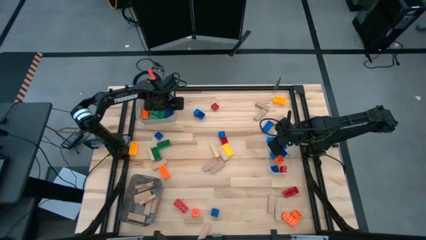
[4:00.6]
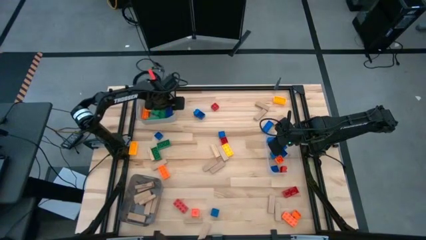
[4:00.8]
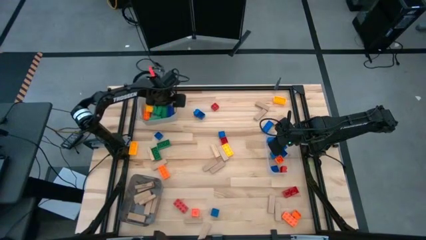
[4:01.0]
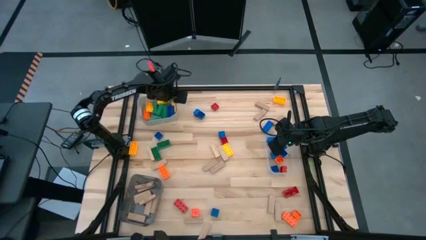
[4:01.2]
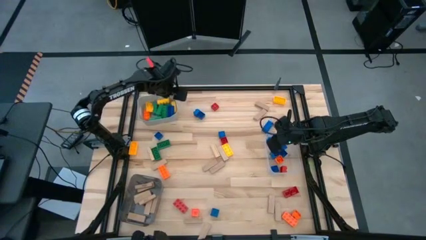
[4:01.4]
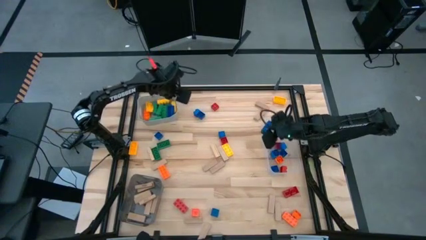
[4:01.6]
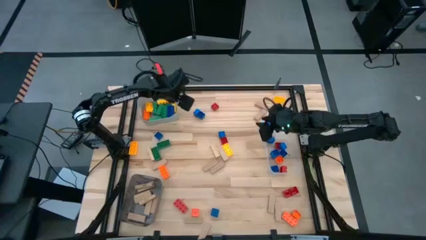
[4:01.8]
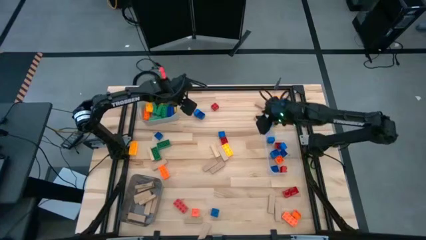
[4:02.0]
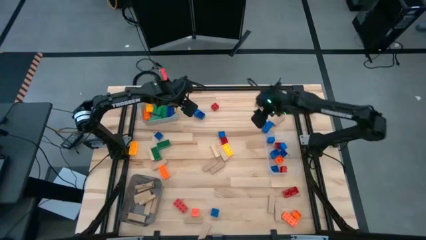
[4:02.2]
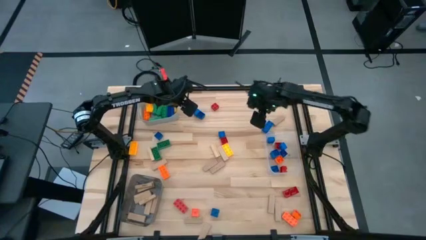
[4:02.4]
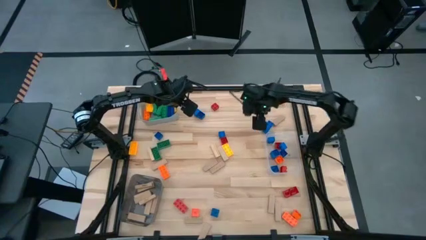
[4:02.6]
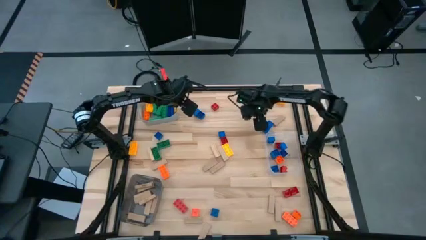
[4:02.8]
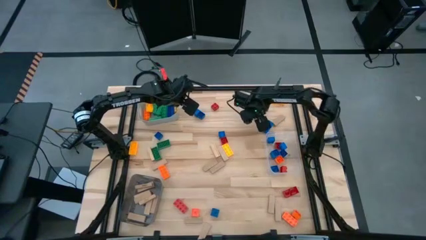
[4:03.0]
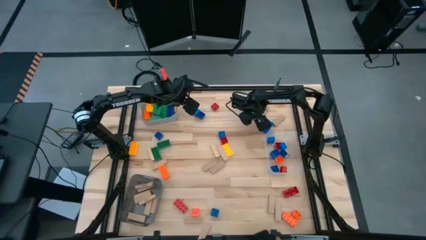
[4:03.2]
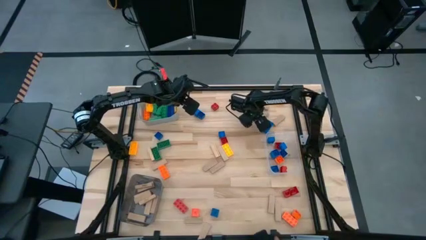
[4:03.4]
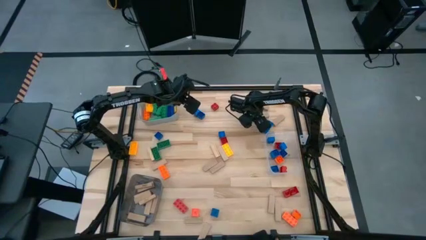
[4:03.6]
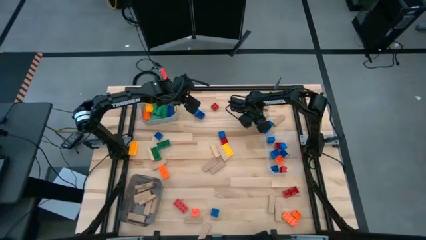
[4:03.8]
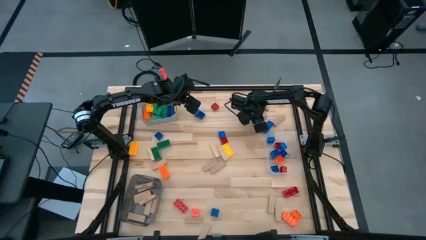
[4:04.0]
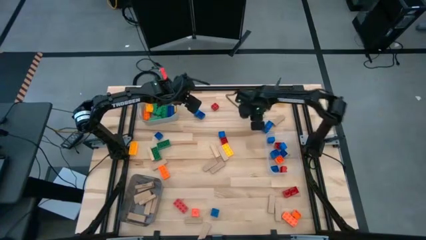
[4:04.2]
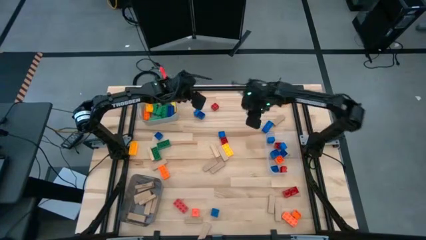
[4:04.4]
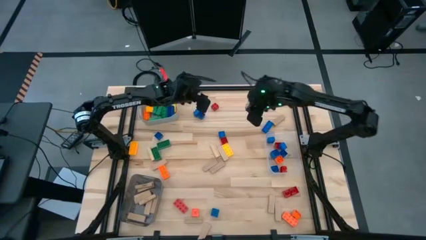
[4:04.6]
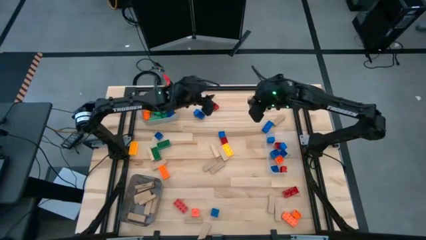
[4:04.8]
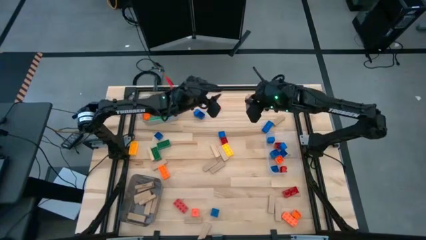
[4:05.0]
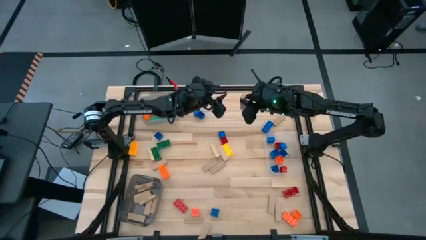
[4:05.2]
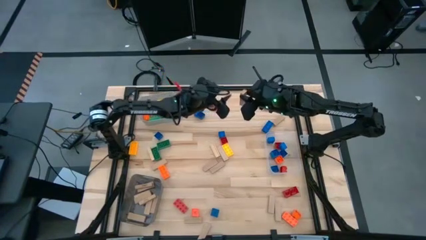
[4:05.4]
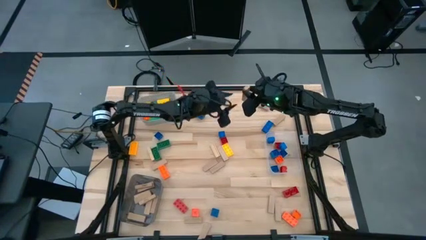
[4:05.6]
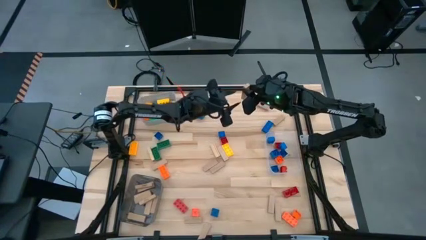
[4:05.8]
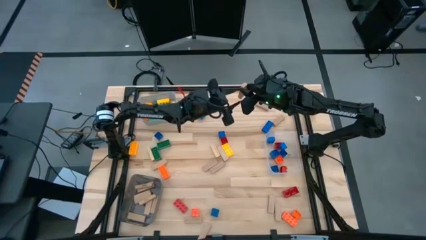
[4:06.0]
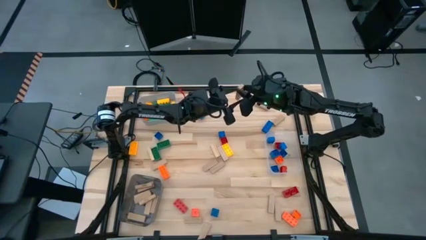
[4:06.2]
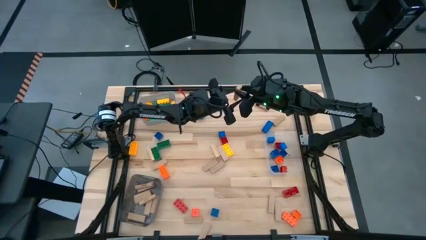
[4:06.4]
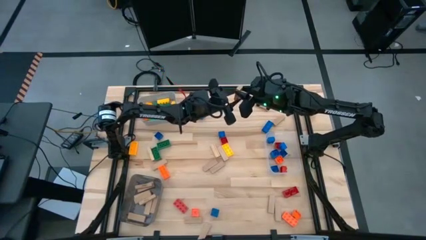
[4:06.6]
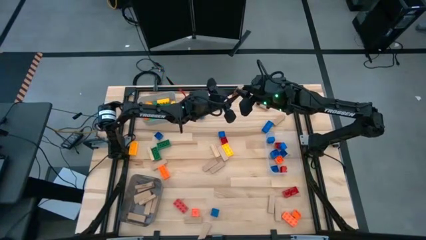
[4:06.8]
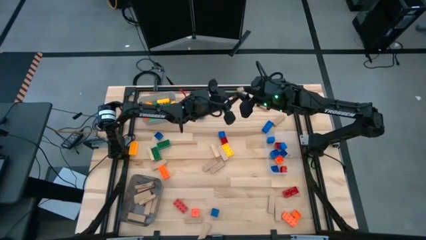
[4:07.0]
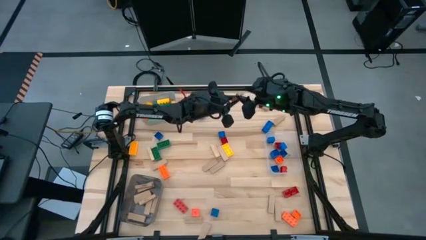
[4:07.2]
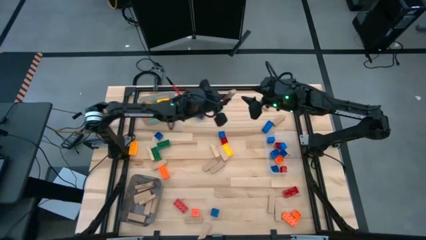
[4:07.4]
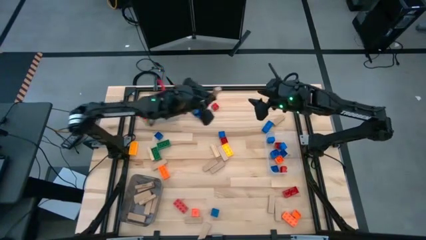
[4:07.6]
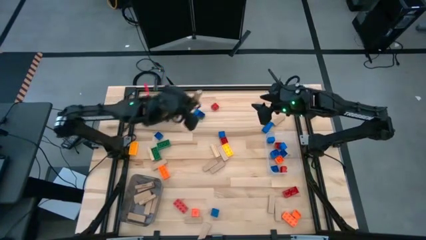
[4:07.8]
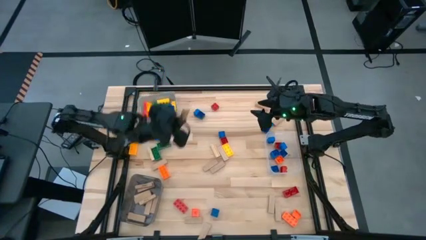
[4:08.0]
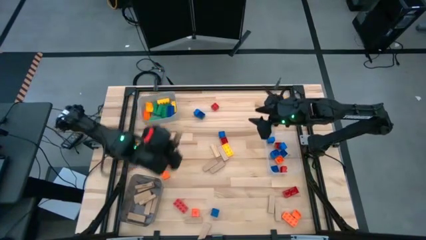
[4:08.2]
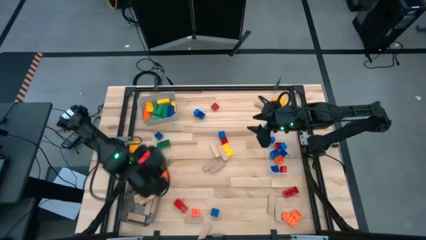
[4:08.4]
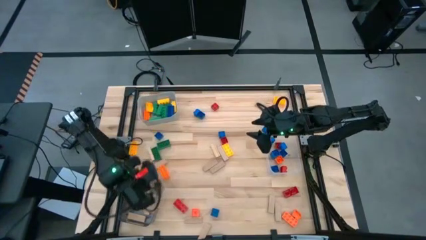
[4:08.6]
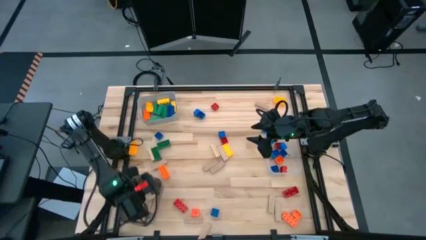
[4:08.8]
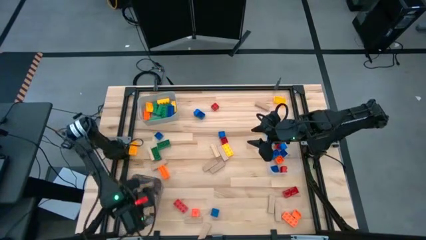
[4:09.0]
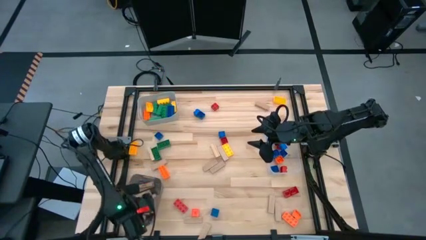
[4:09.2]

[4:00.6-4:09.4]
Task: Sort blocks by size
Put the brown block into the black bin

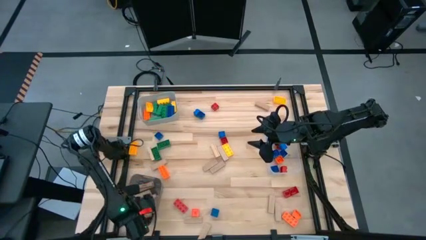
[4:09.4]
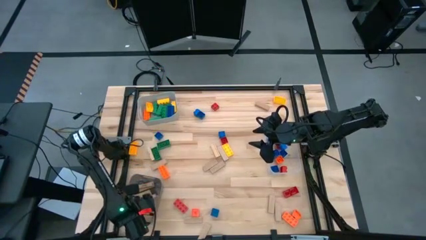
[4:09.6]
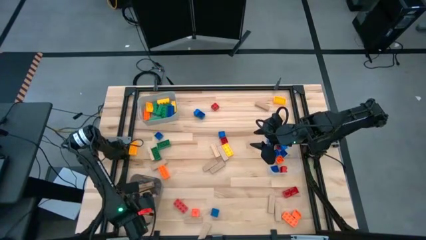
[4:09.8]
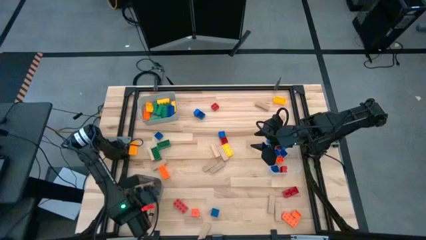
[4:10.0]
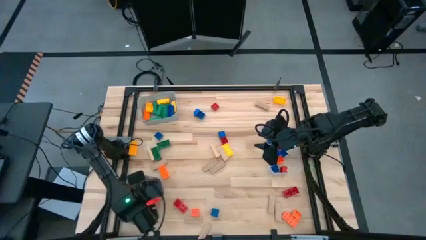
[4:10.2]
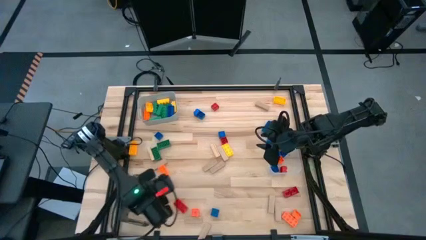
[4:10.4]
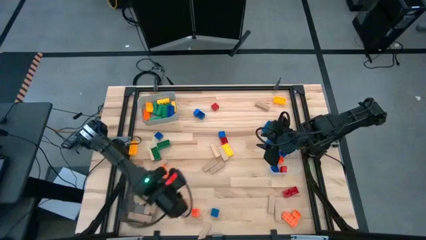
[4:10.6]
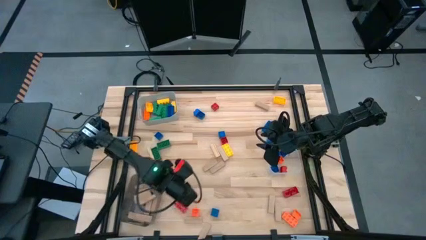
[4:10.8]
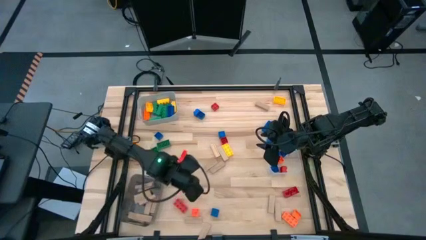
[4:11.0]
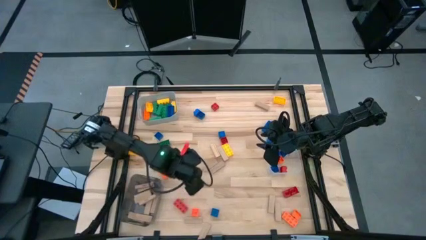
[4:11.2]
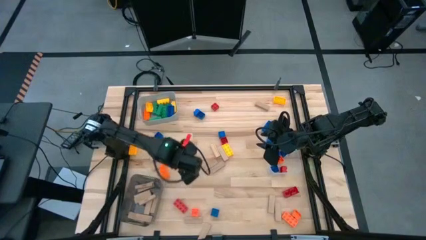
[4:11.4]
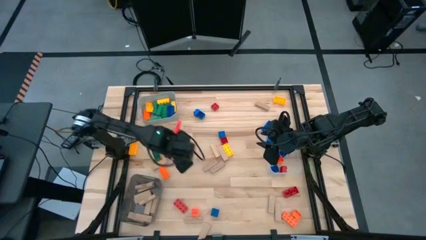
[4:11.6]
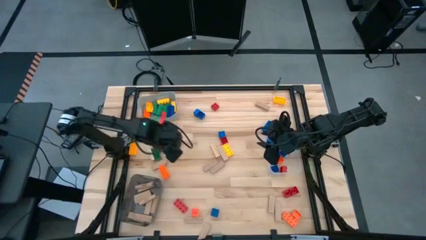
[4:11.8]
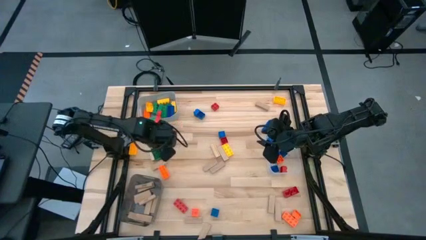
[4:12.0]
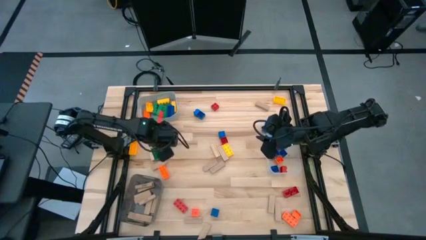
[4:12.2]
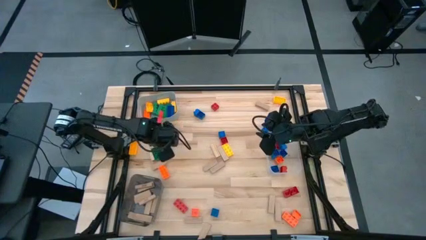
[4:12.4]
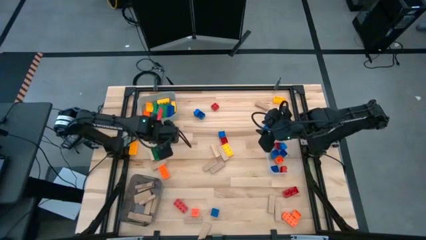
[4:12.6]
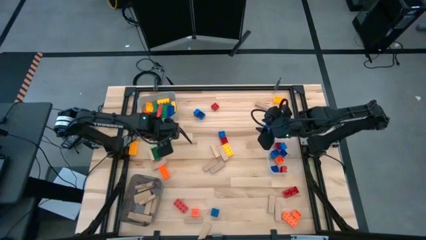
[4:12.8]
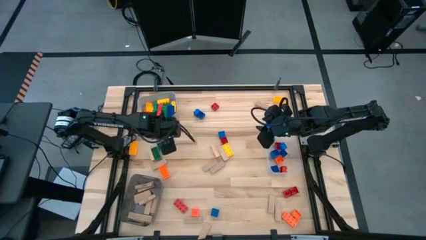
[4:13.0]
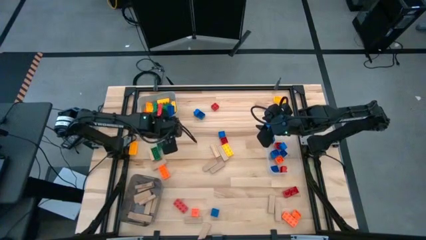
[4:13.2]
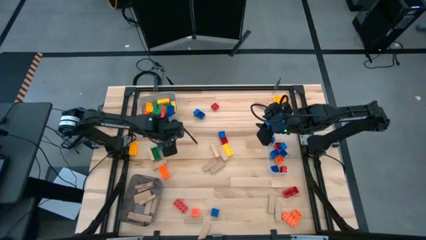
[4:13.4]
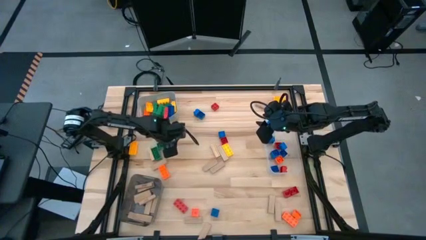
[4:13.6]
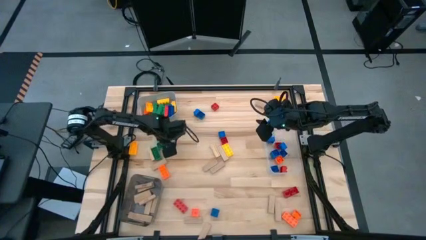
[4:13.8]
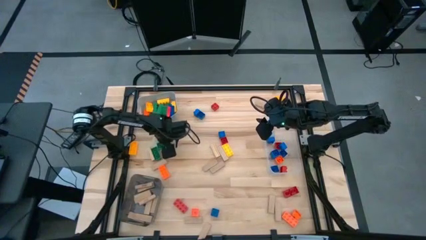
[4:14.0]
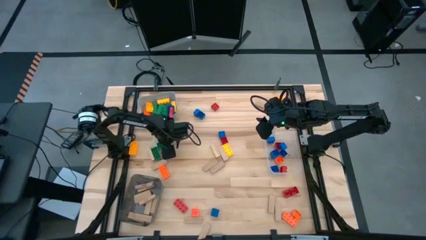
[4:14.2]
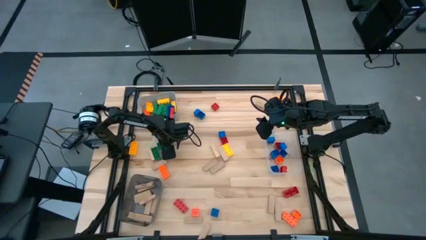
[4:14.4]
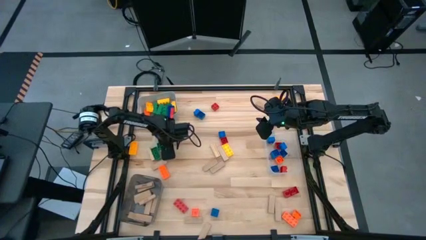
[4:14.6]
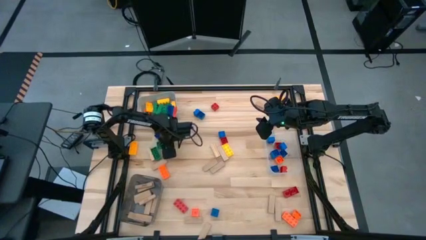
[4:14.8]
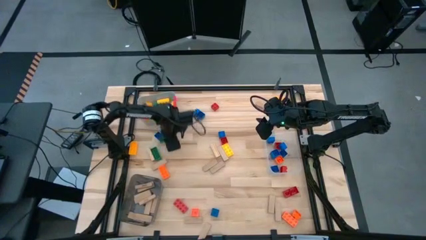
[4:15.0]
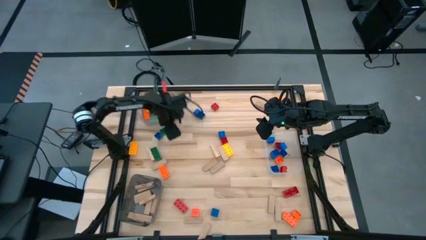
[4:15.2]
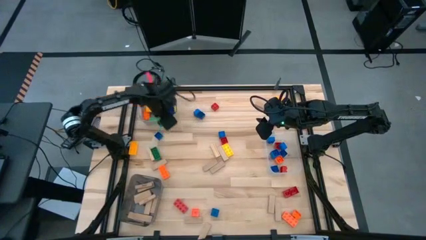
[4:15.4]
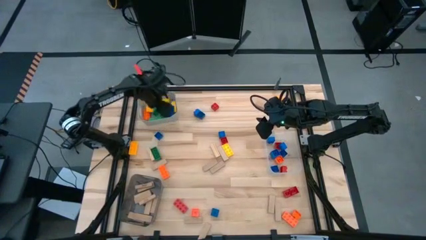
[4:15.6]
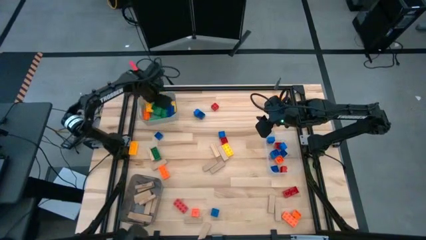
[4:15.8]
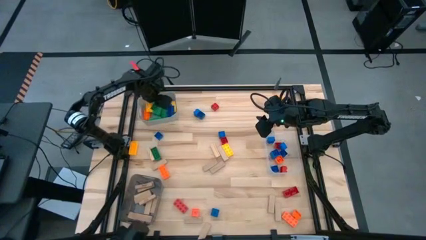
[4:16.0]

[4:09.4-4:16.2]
Put the large green game piece into the gray bin
